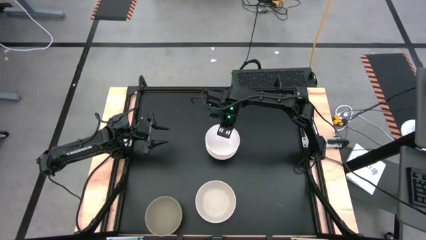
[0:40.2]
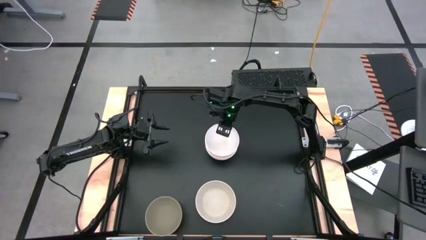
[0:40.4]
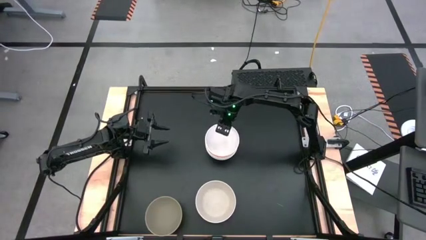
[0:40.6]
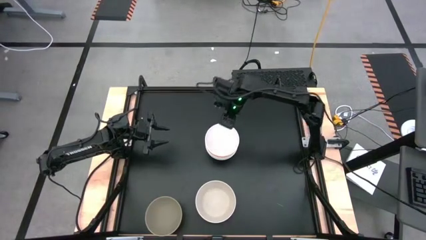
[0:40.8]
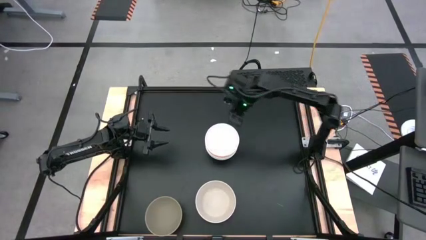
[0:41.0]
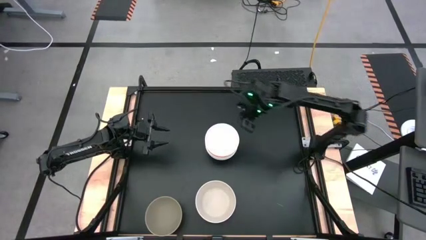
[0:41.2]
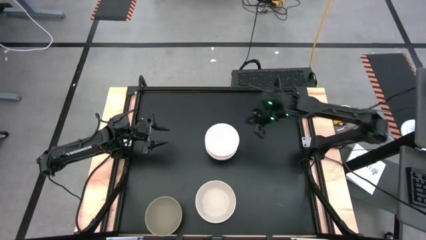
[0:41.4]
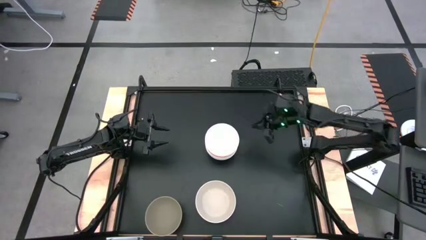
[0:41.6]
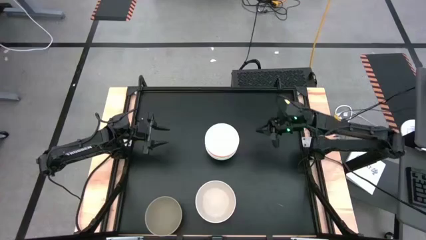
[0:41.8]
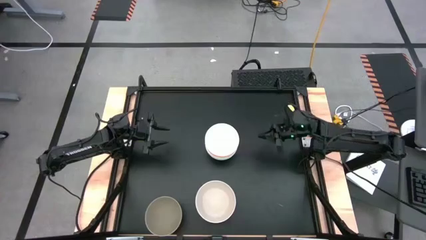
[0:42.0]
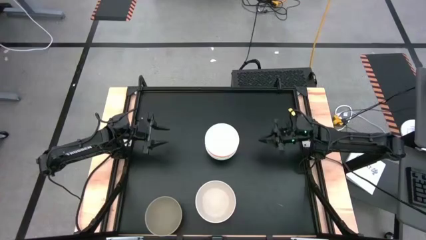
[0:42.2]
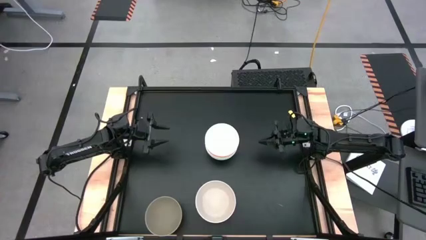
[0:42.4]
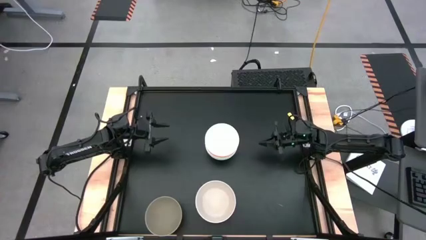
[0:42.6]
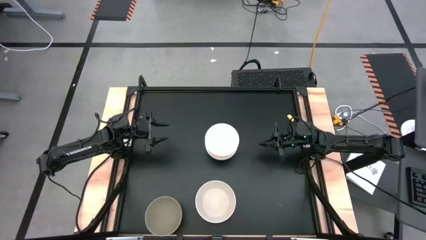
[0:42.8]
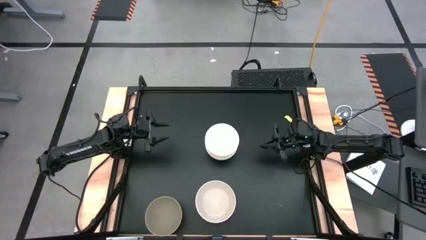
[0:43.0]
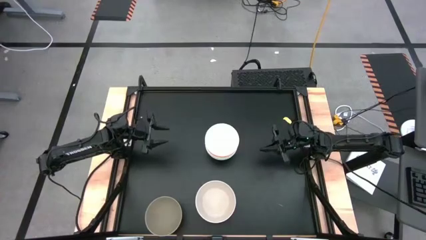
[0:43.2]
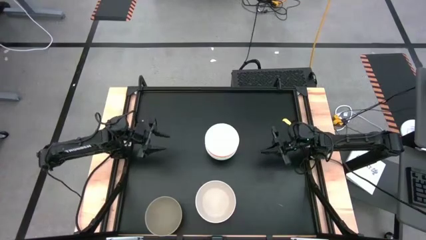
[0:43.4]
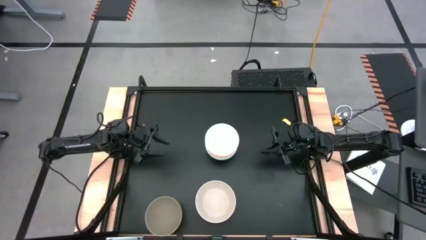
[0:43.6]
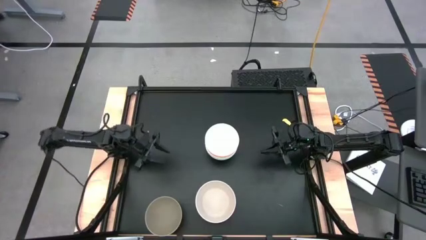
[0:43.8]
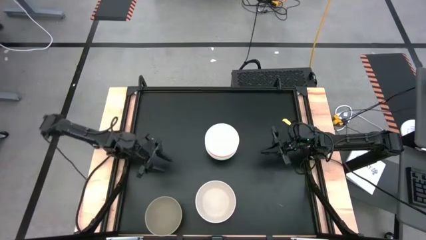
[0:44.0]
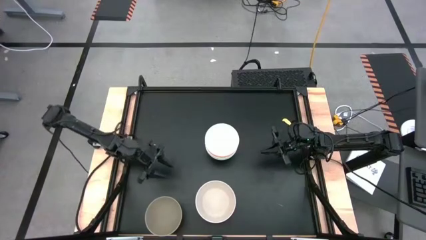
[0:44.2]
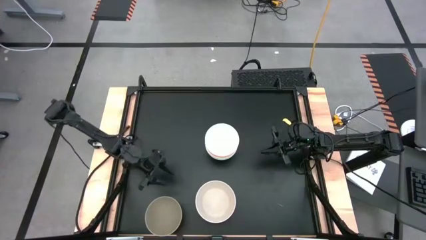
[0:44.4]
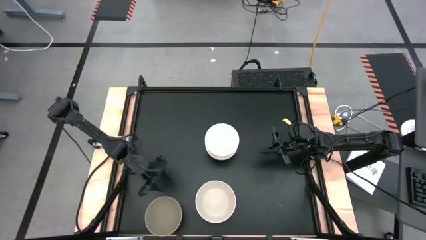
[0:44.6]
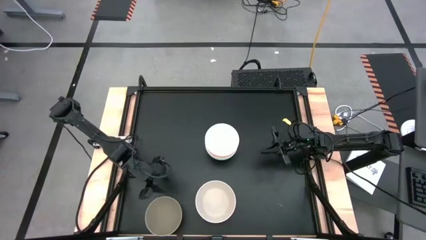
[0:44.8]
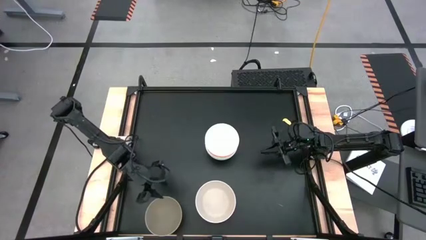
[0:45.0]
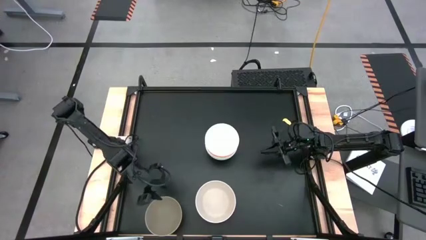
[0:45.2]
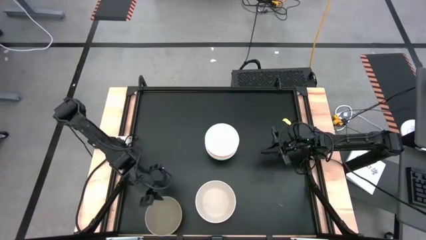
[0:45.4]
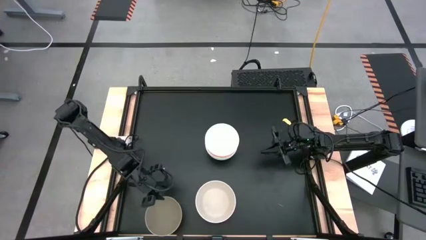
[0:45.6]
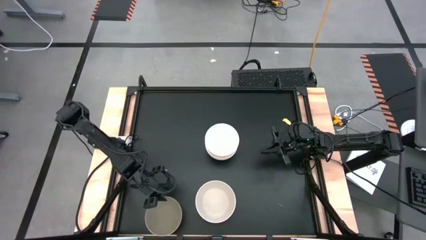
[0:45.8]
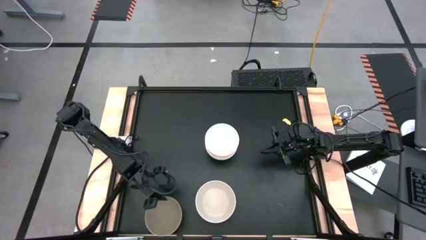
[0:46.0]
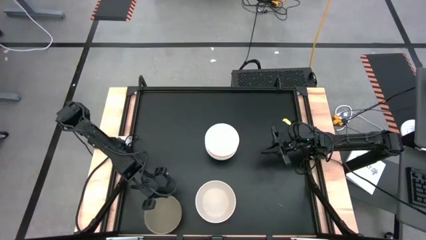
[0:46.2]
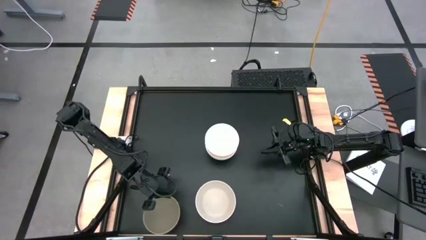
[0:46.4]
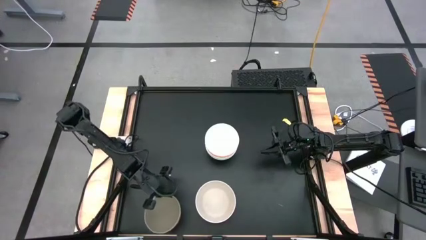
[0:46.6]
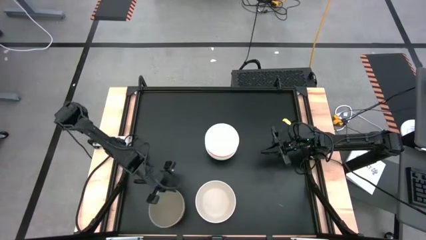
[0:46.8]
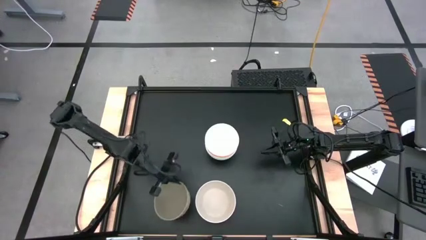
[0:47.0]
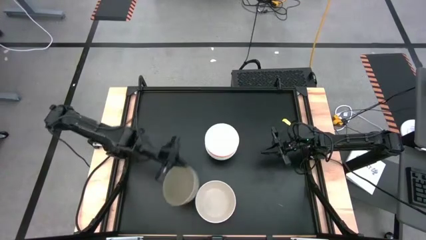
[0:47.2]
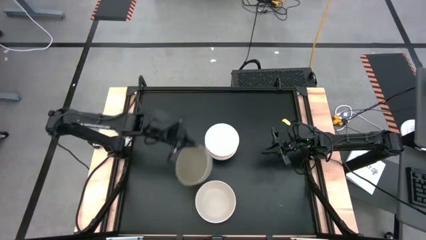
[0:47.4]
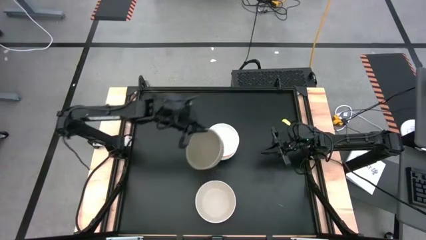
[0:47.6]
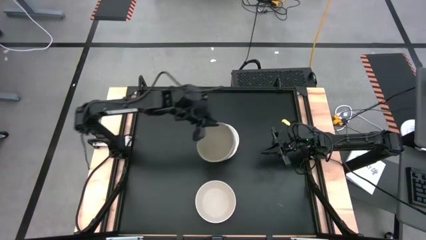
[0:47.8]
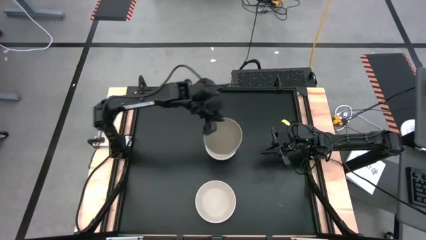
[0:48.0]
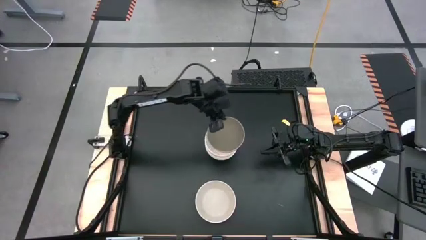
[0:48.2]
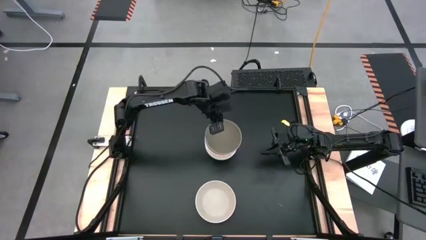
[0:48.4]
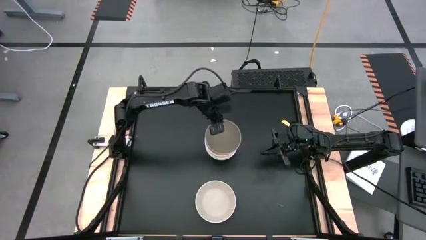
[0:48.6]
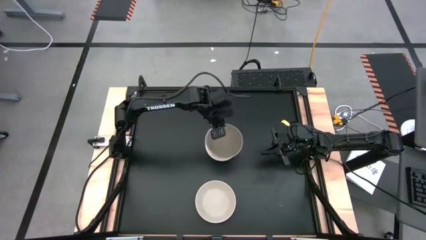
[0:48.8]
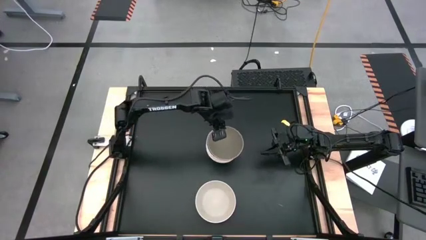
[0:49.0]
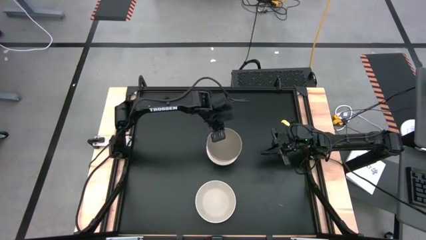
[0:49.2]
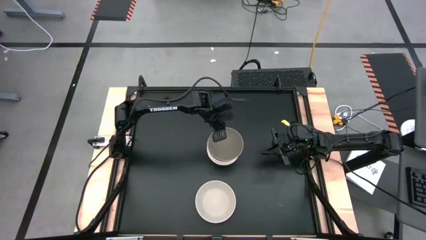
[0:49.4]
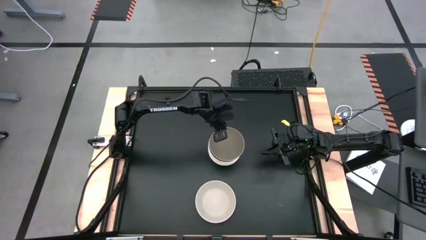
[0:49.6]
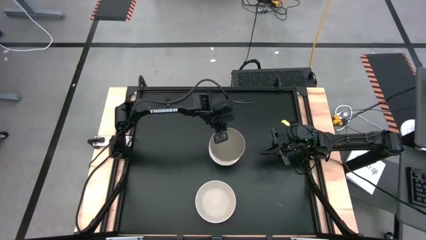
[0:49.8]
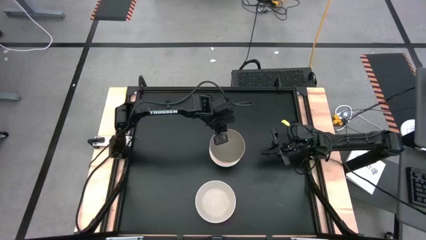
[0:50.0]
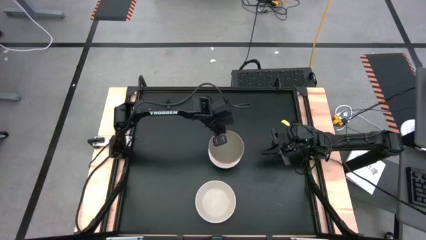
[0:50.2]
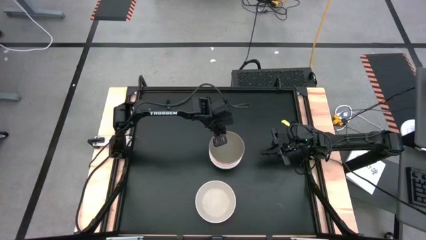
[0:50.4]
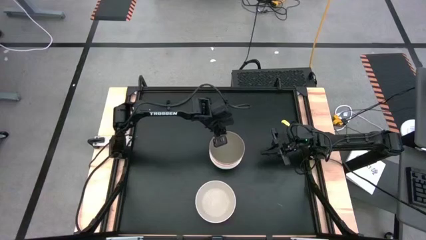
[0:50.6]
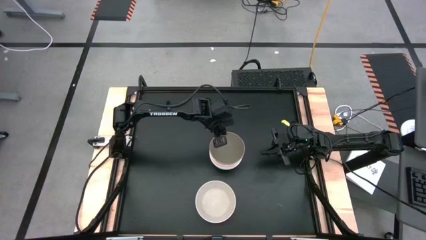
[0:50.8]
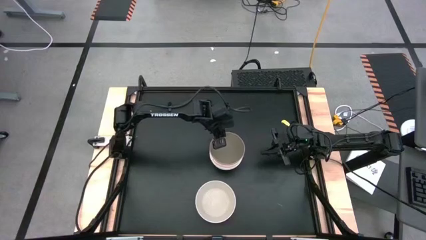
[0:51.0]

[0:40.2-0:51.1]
Task: Nest bowls inside each other
Stack the gray bowl on the white bowl

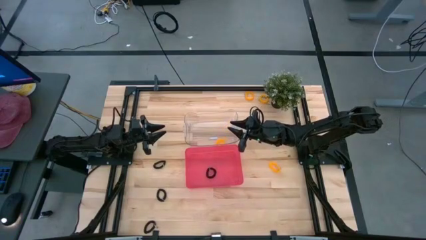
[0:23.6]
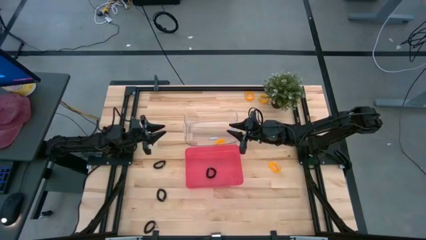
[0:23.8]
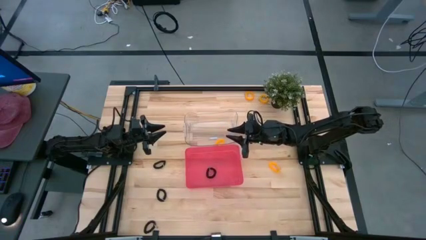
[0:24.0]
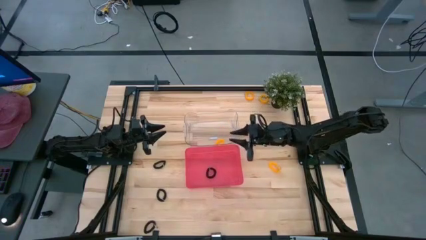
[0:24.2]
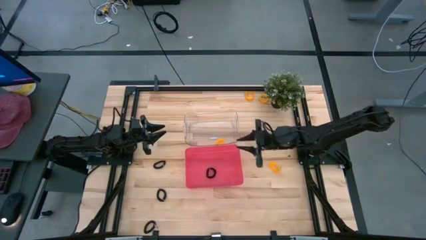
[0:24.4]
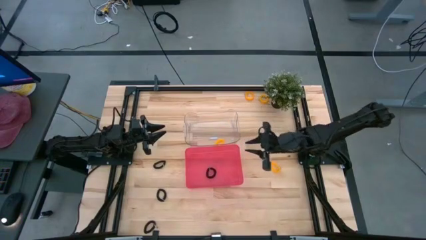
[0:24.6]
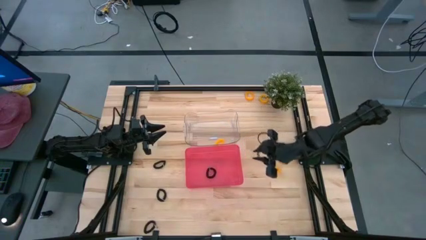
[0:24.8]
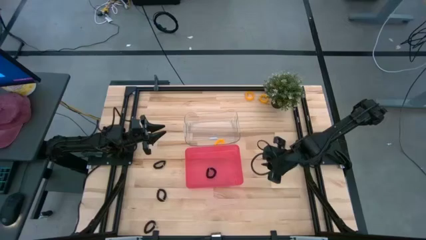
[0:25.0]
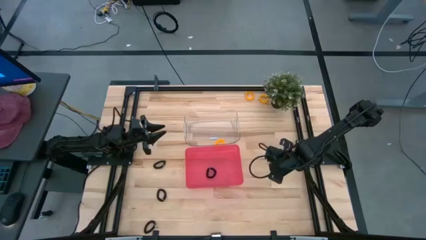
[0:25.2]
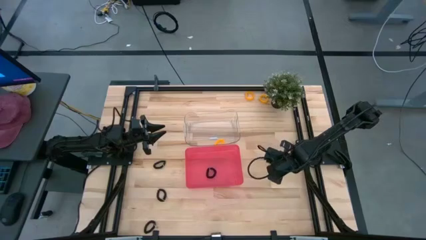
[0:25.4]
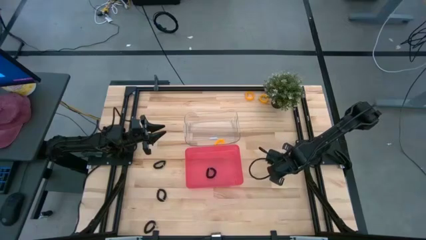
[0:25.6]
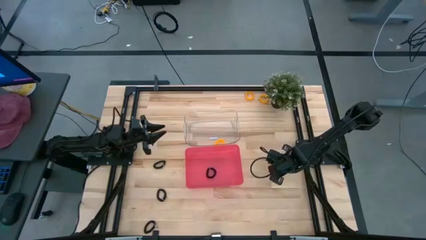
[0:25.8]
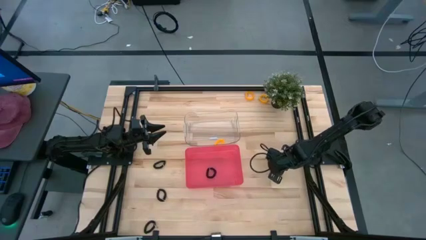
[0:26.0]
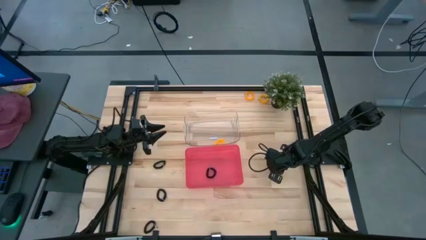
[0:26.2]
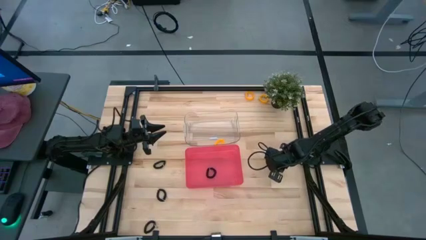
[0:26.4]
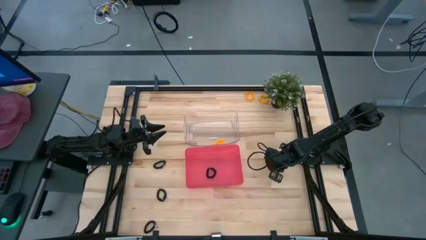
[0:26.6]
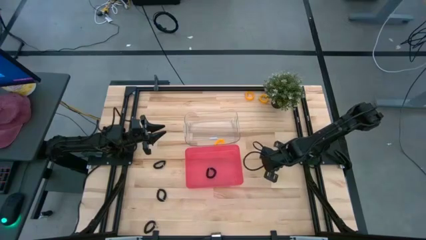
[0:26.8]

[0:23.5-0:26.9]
Task: Sort spring keychains
Put the yellow spring keychain into the transparent bin

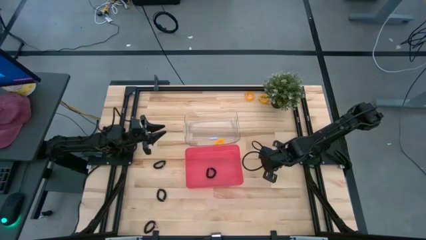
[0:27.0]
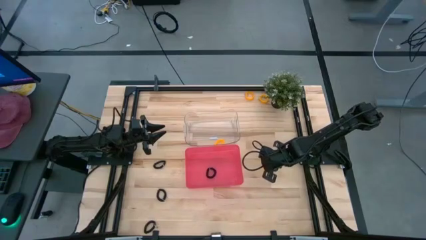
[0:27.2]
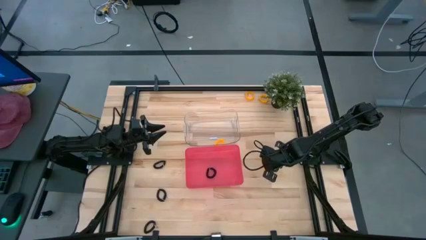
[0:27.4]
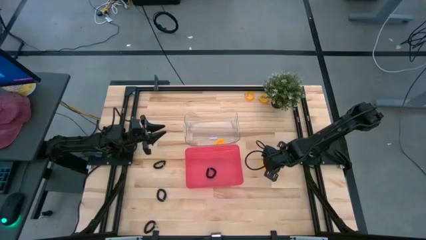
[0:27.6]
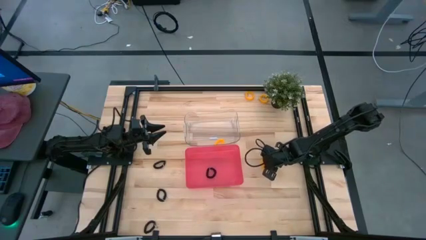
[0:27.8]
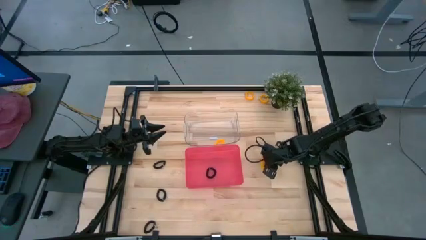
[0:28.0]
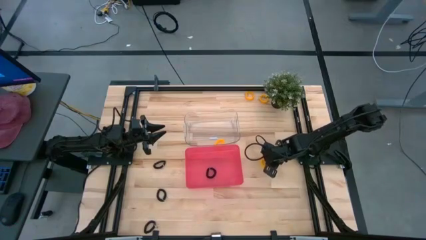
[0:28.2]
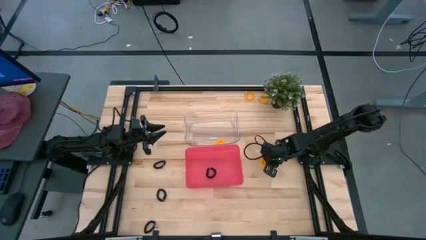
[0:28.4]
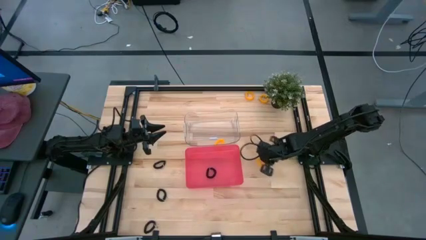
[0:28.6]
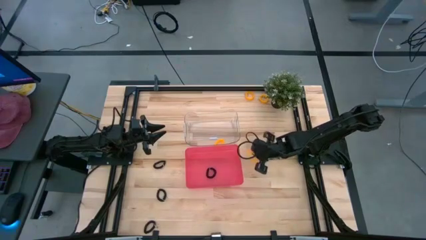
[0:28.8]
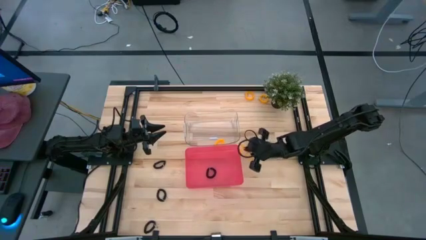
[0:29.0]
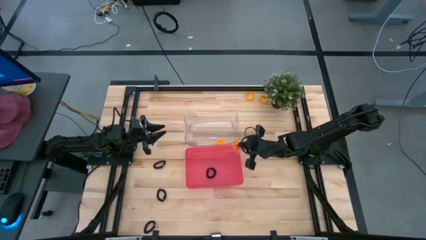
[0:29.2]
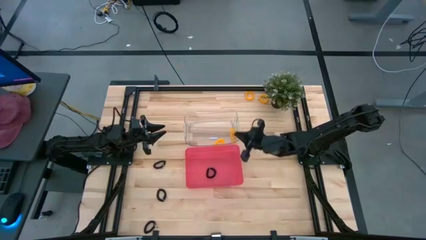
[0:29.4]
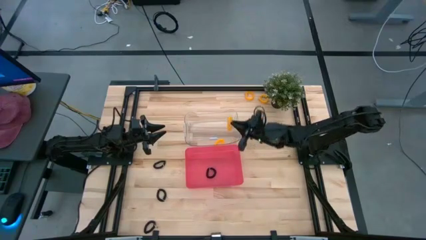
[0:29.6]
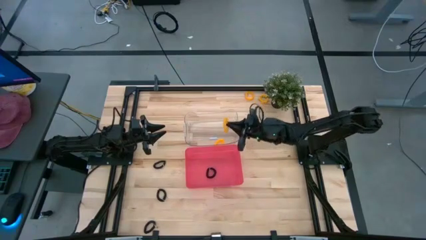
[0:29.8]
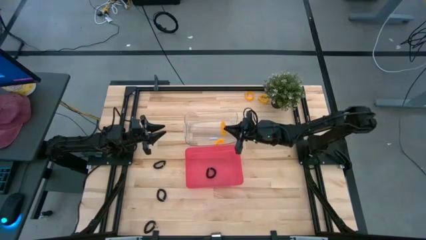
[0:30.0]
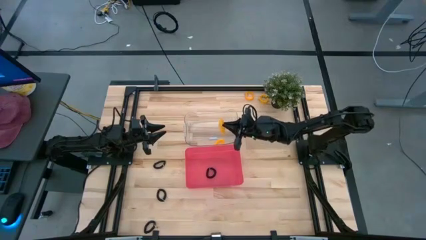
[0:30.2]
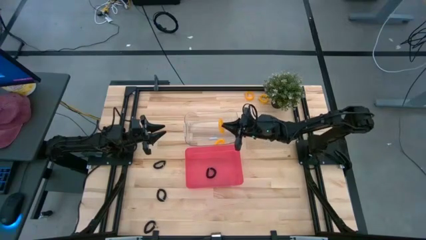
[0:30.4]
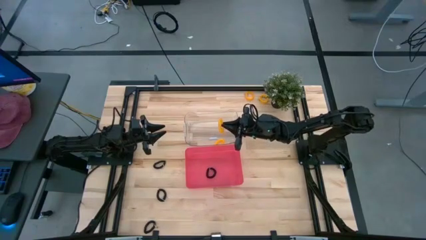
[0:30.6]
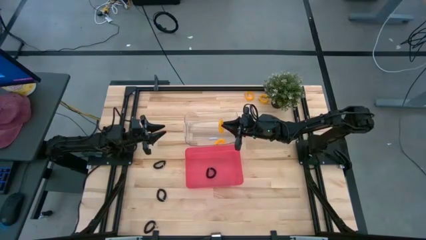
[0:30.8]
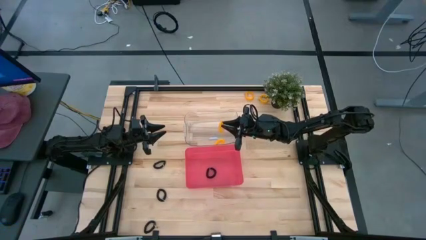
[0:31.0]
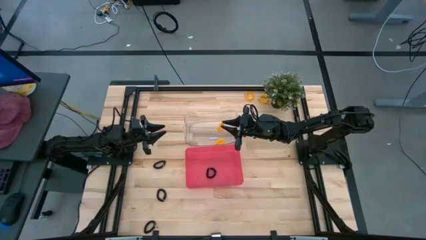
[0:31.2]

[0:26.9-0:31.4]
Put the yellow spring keychain into the transparent bin
